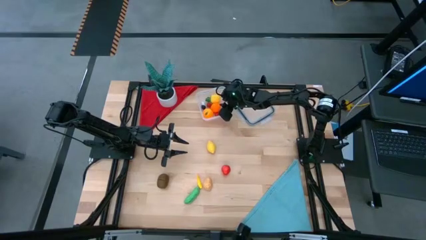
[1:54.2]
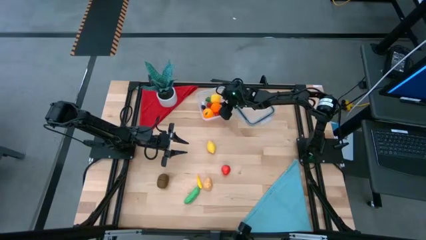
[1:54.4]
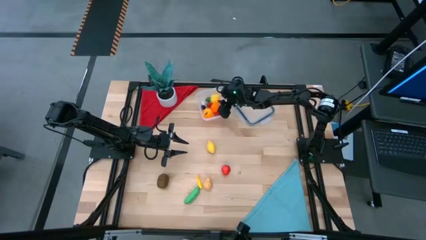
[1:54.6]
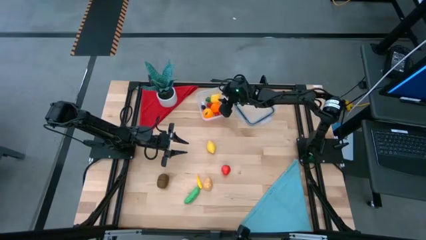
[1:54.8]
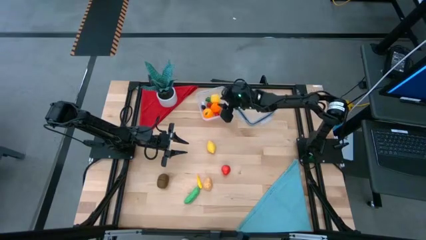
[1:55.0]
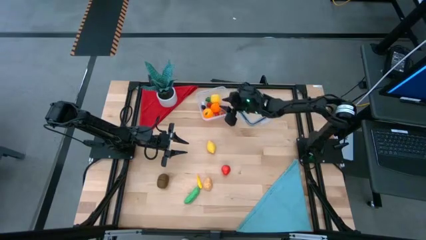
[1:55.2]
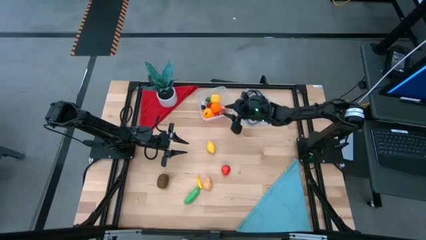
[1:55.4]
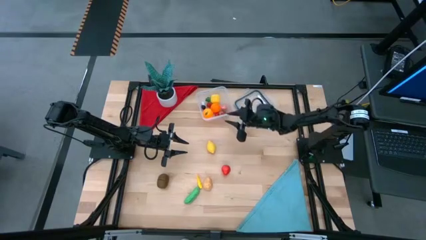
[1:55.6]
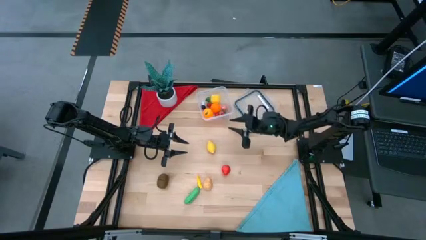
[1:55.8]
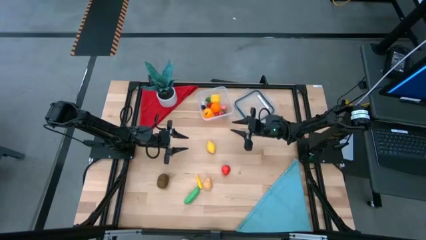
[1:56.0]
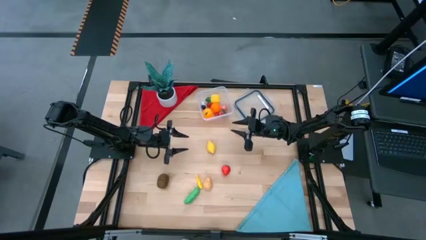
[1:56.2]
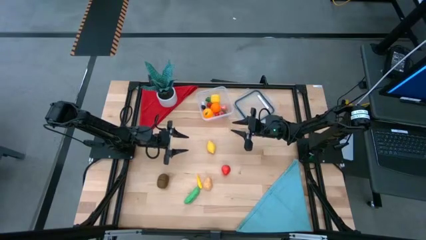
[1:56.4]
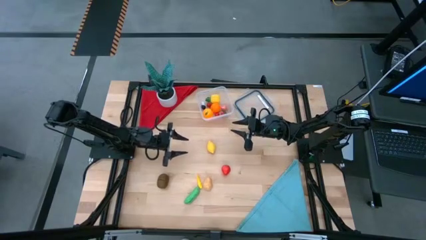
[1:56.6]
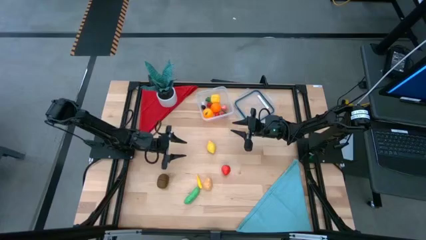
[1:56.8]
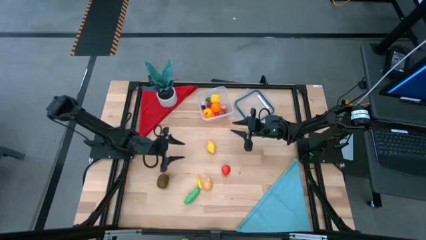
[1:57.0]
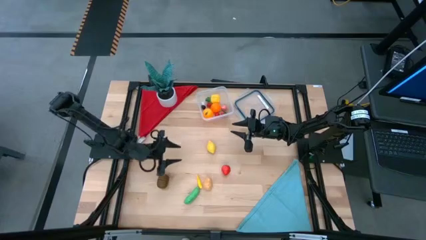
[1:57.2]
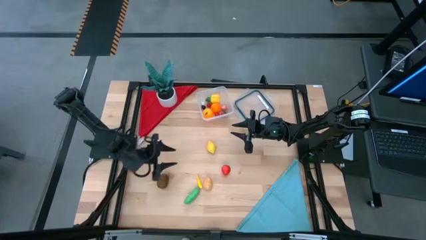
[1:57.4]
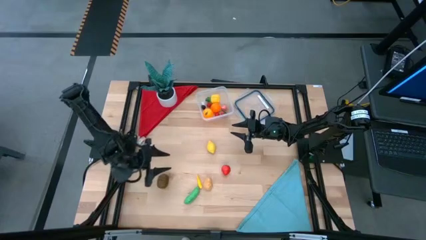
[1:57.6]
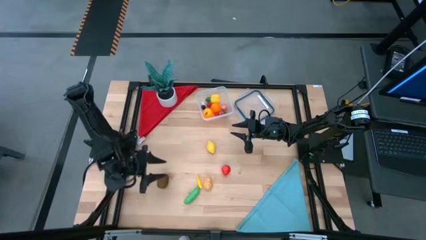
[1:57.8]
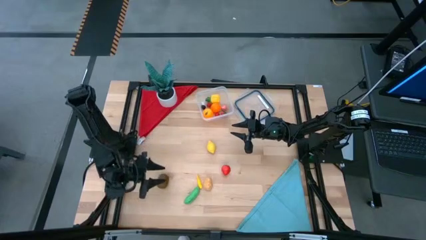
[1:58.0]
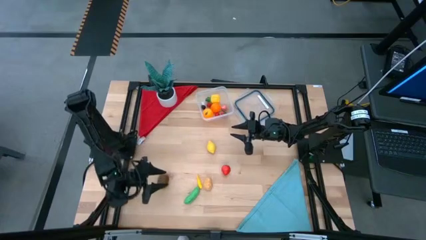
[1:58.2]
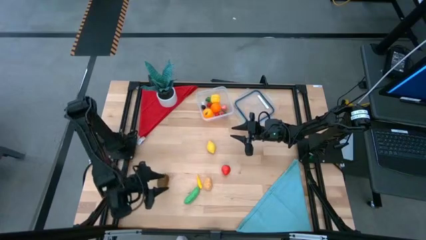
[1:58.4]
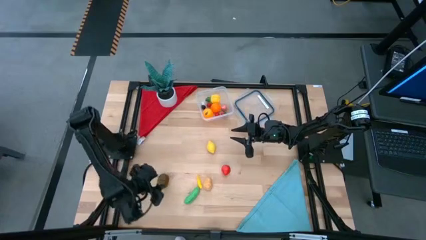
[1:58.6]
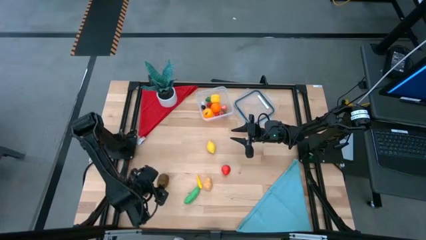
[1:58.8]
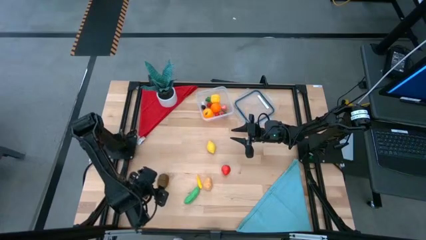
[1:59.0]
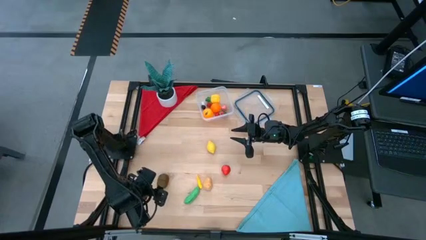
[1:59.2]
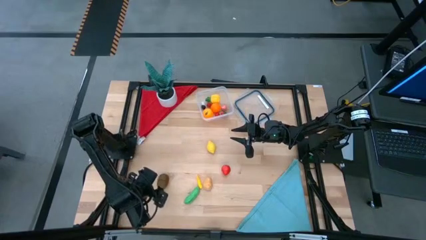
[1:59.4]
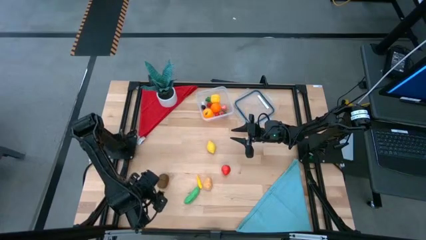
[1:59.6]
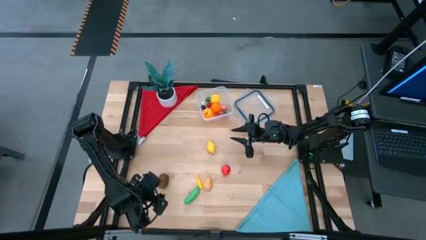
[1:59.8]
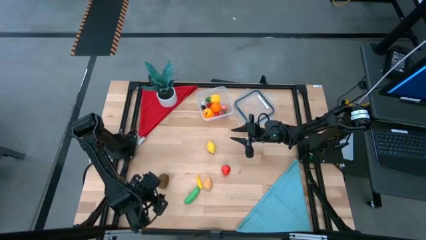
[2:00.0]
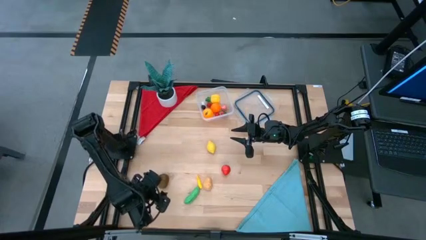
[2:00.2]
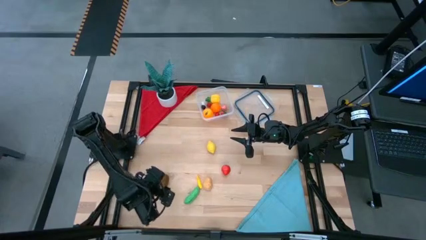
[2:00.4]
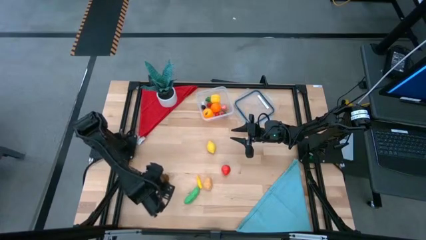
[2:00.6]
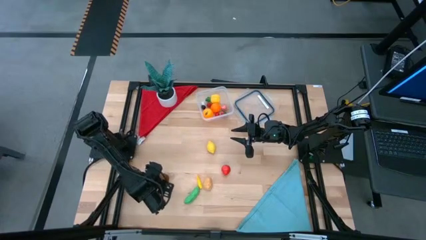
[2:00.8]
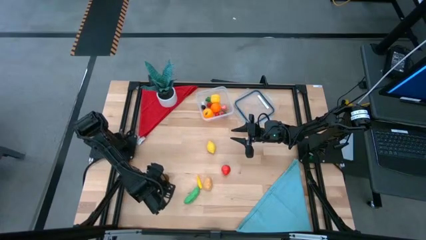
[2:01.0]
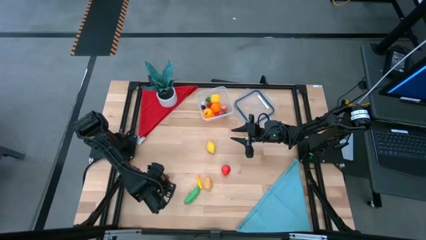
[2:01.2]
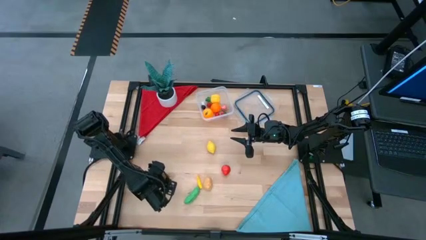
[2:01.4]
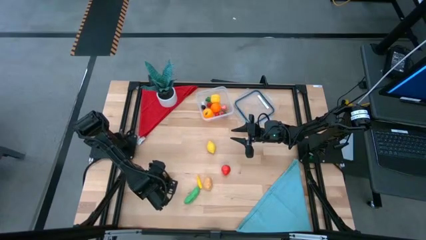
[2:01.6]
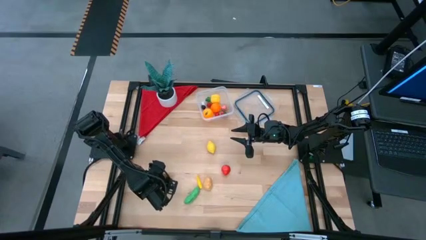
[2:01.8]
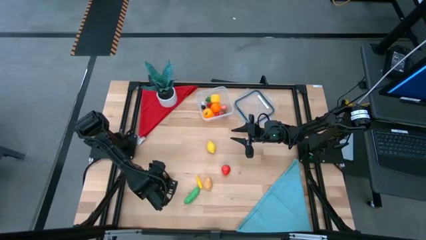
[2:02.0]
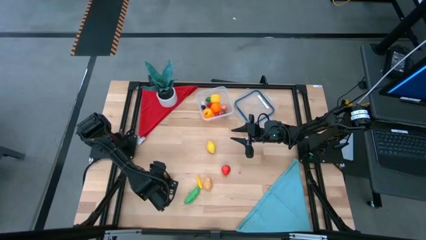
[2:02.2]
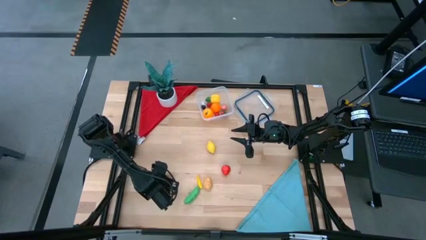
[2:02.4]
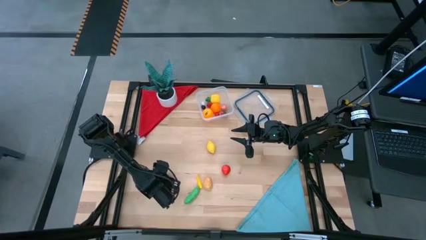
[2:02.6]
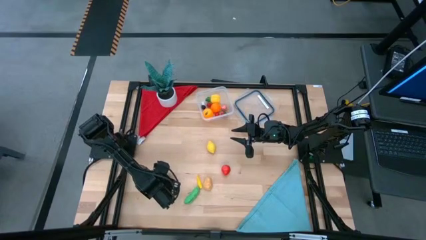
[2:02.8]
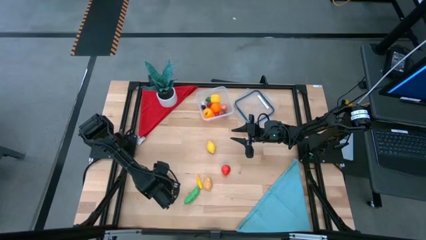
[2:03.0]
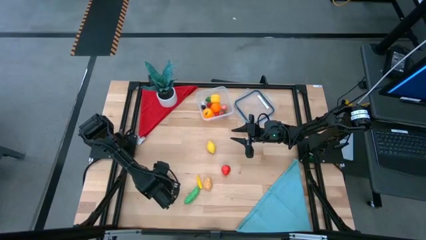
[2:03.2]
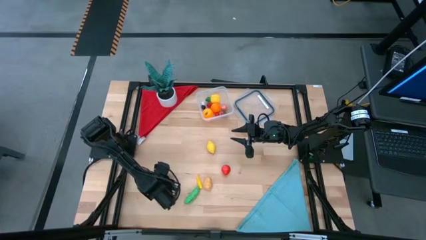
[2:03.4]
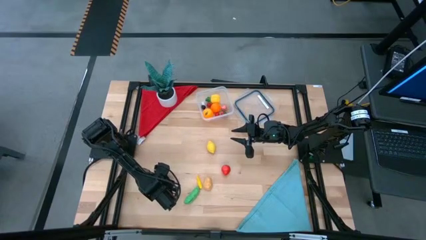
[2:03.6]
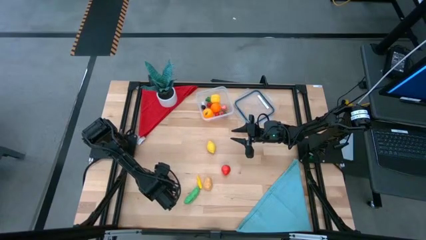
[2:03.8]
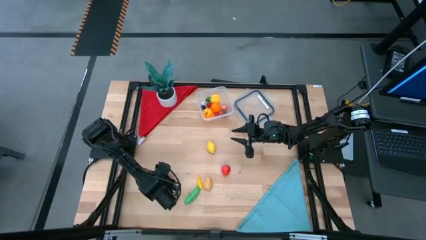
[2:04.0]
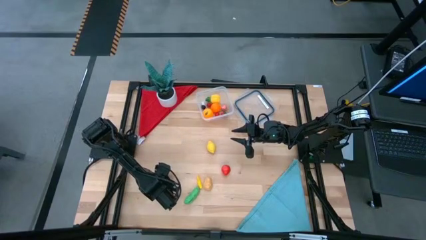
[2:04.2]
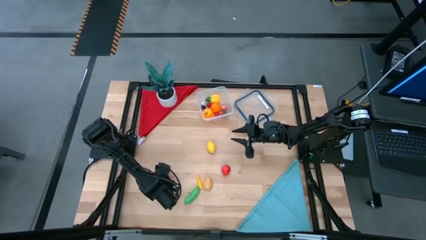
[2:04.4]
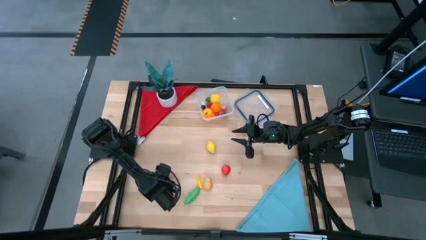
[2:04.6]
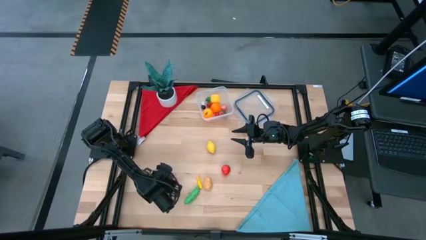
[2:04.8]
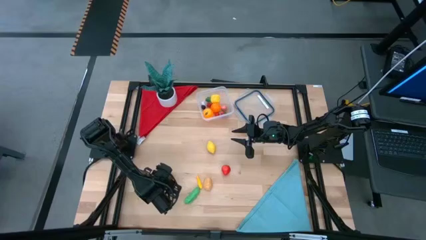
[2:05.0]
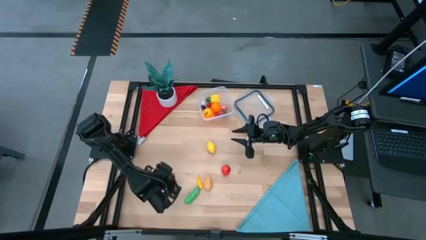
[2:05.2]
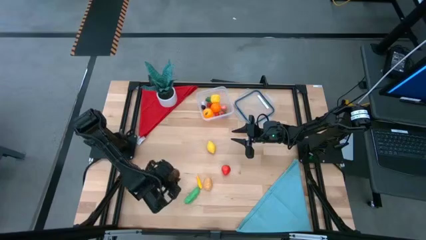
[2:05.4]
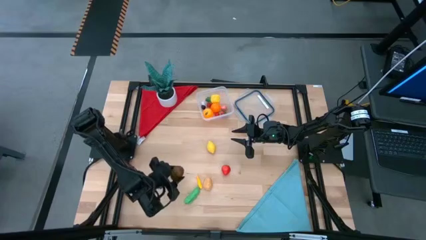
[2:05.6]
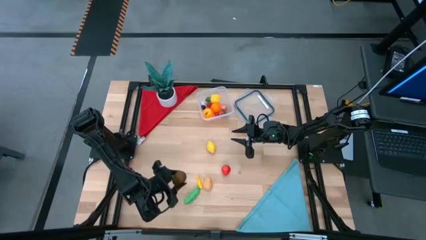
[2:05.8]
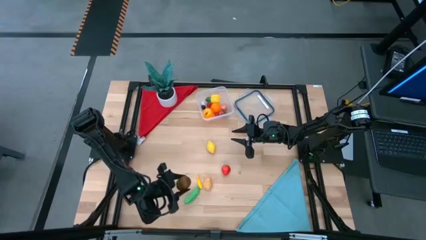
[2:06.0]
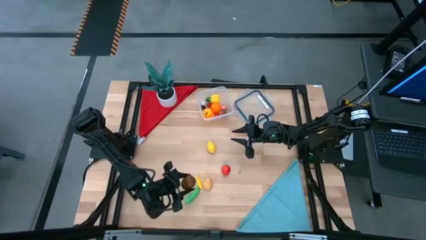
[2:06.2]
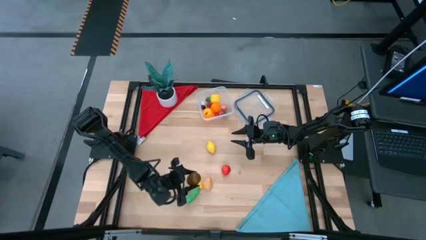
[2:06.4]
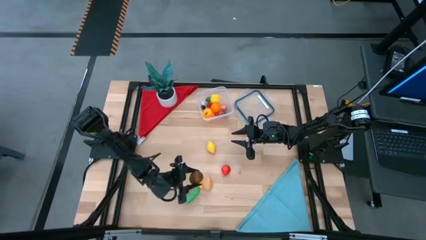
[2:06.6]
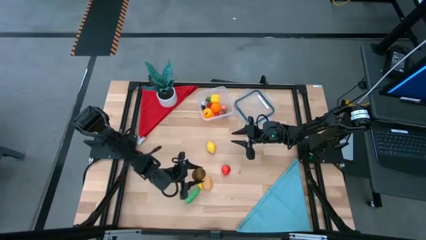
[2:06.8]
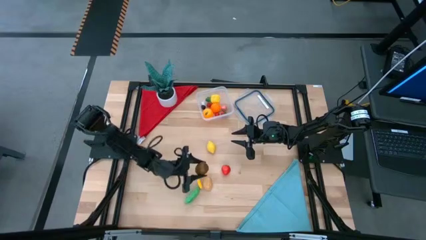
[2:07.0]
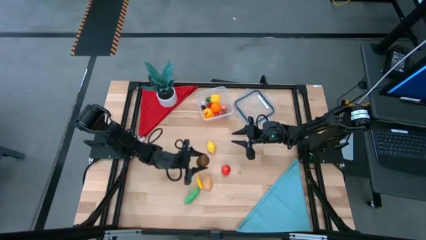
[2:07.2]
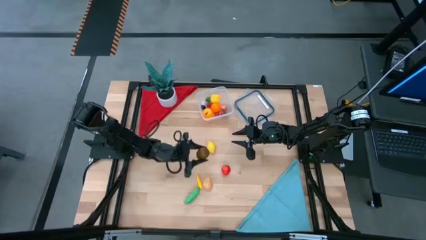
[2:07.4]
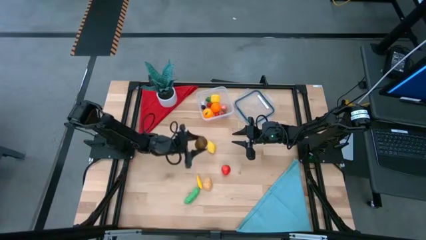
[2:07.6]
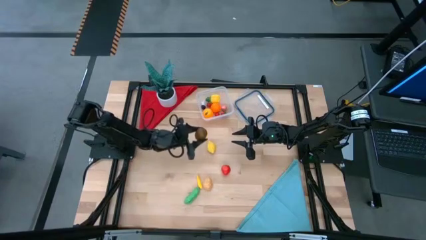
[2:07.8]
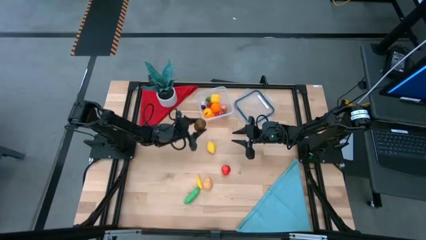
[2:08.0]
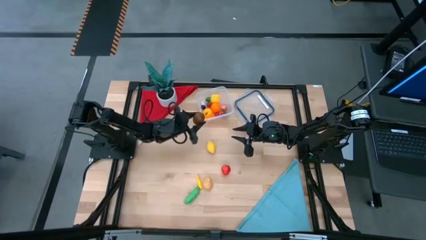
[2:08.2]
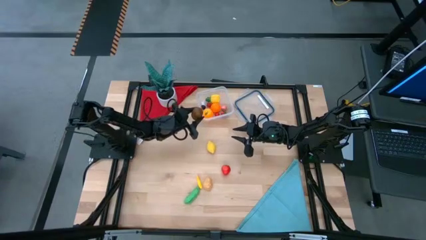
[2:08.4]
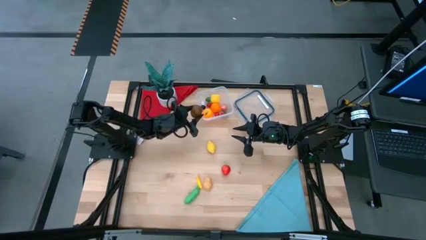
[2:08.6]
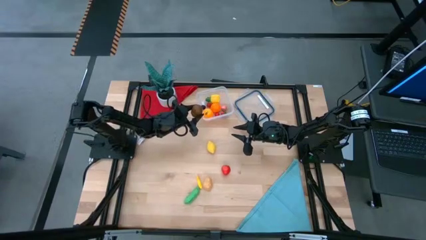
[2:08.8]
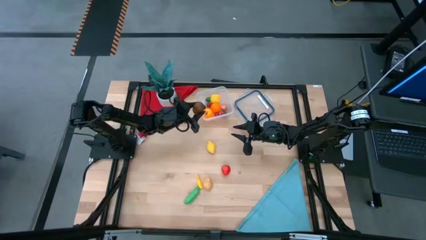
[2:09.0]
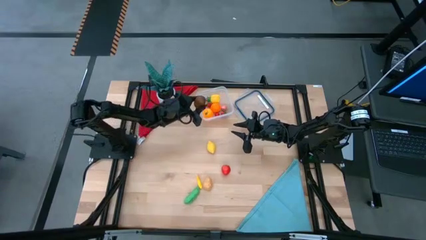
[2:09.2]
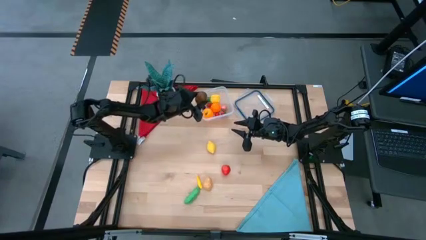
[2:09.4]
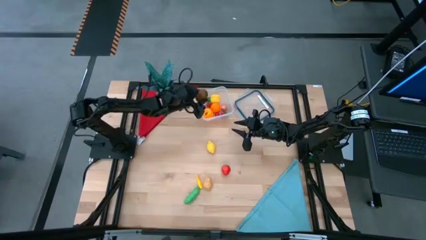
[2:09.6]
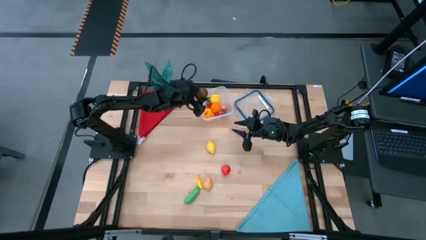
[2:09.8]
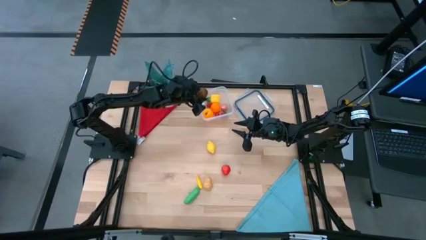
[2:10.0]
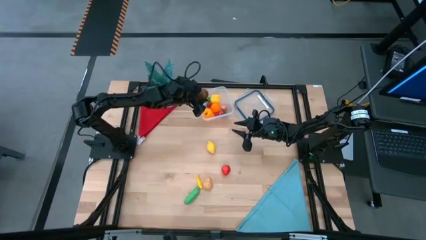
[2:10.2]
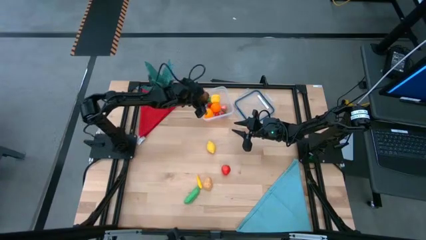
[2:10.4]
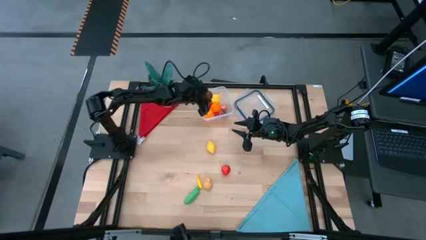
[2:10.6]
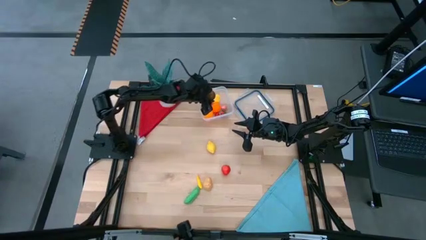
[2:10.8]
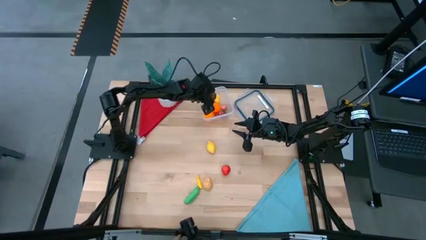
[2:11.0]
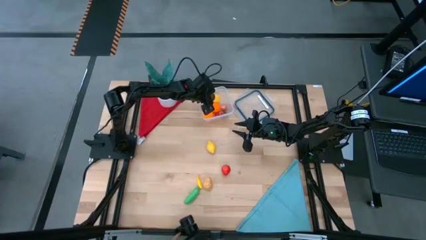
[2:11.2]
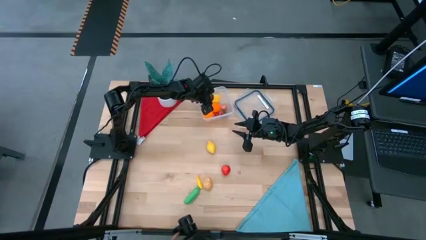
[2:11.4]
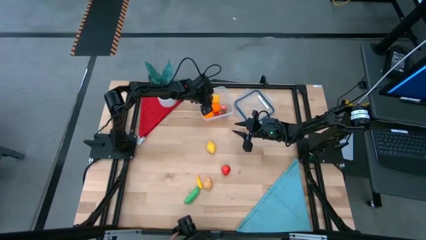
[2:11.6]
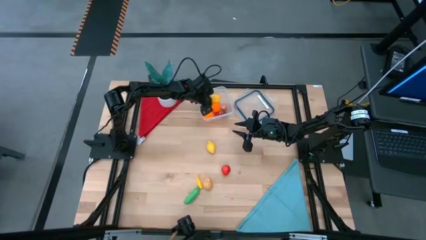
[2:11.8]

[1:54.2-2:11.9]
Task: Pick and placing Produce into tupperware
Put the brown kiwi into the transparent container
